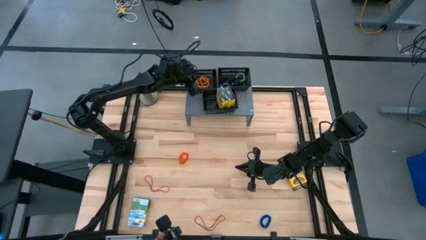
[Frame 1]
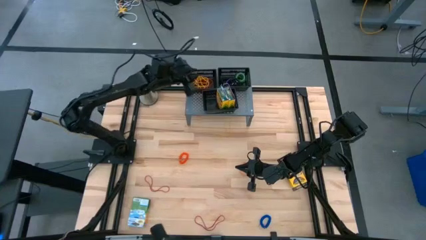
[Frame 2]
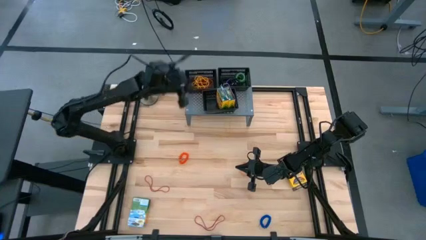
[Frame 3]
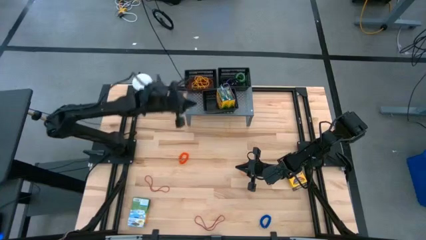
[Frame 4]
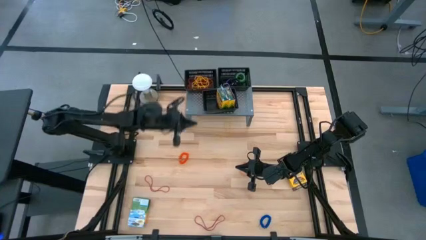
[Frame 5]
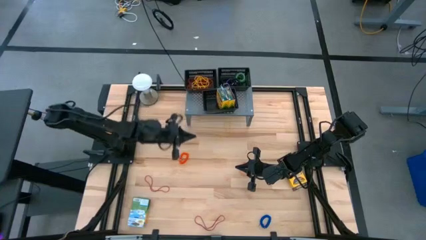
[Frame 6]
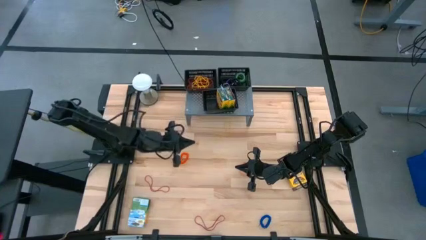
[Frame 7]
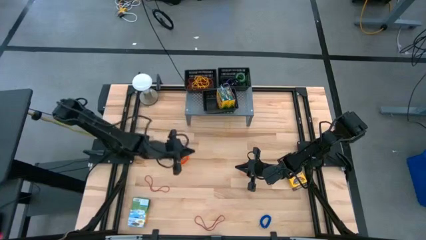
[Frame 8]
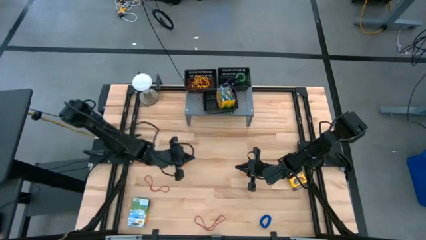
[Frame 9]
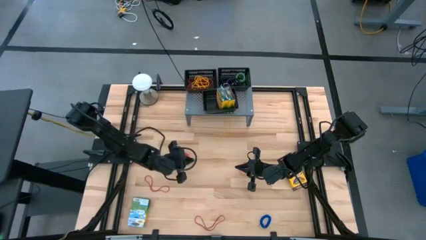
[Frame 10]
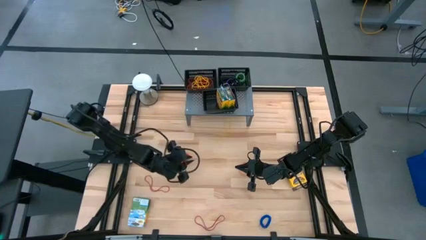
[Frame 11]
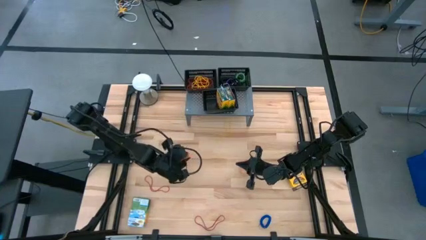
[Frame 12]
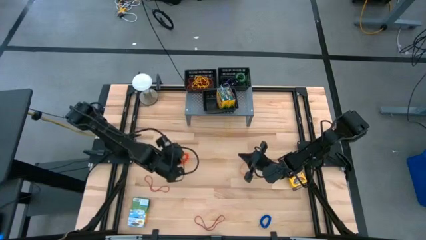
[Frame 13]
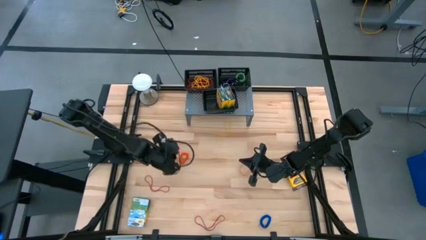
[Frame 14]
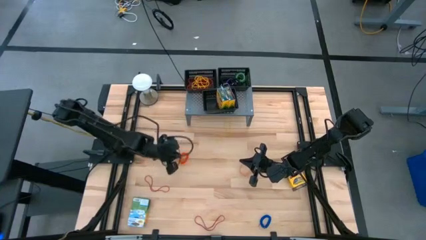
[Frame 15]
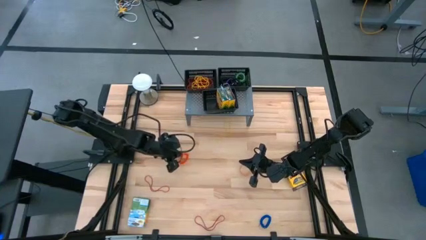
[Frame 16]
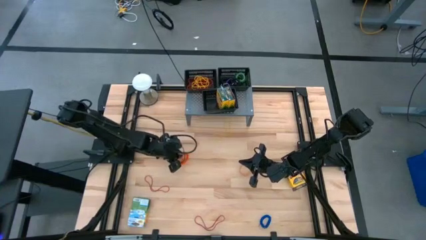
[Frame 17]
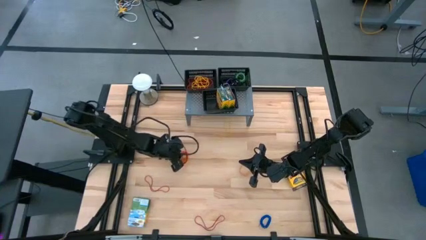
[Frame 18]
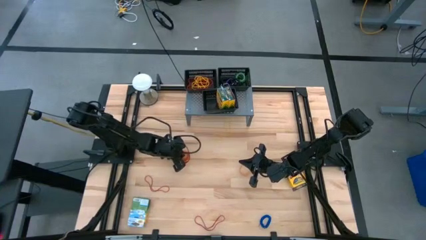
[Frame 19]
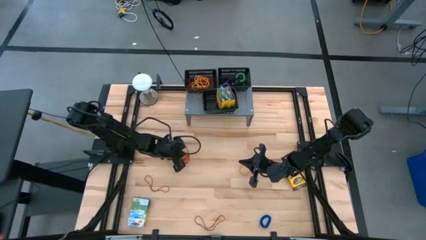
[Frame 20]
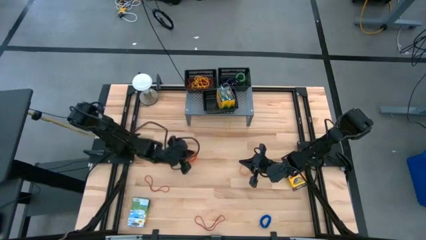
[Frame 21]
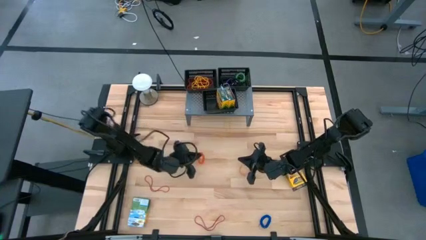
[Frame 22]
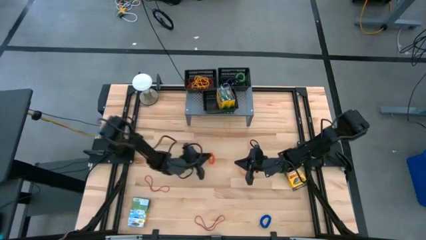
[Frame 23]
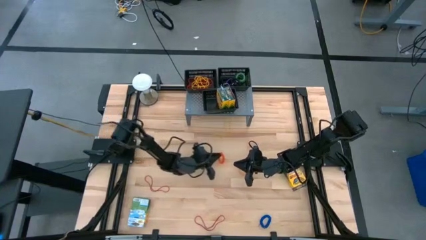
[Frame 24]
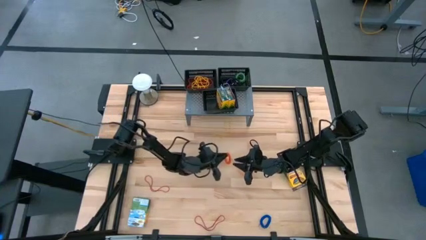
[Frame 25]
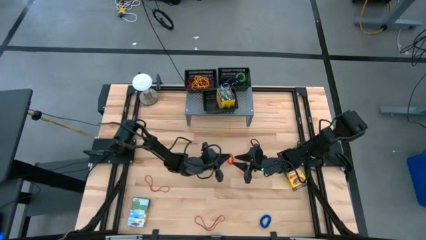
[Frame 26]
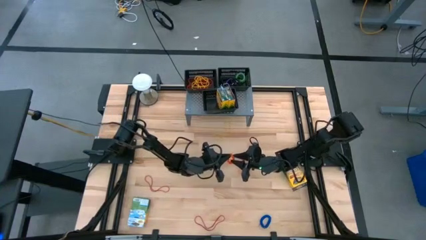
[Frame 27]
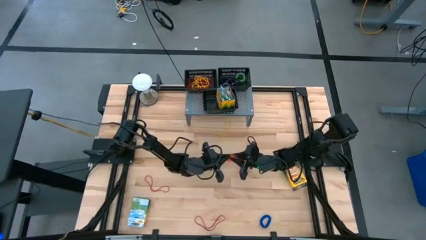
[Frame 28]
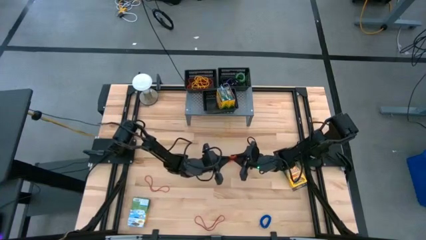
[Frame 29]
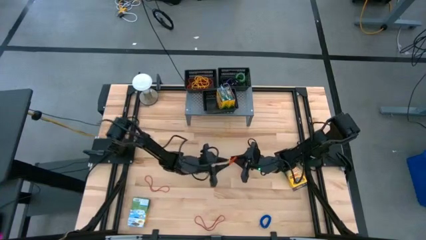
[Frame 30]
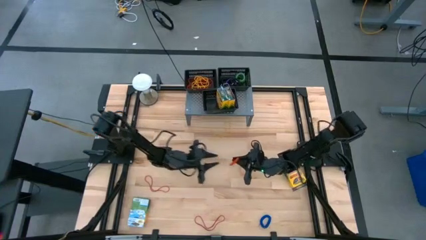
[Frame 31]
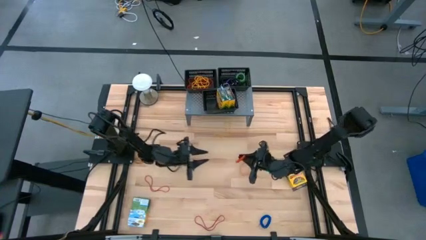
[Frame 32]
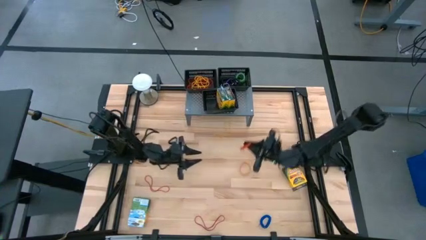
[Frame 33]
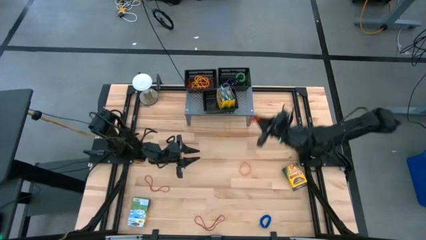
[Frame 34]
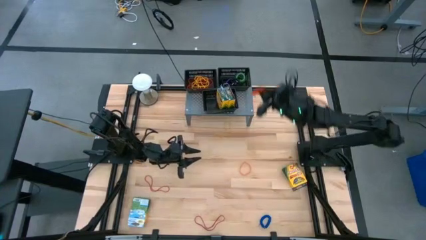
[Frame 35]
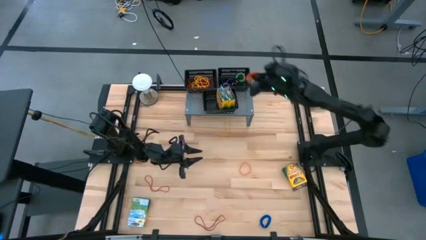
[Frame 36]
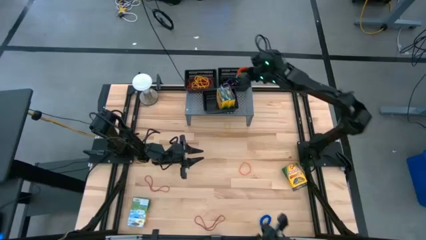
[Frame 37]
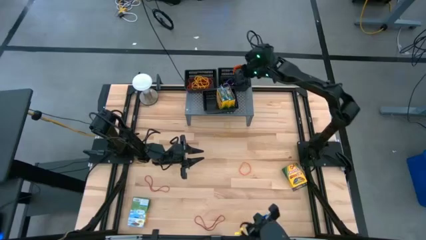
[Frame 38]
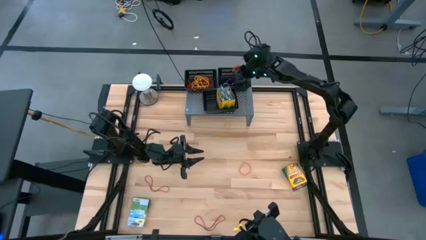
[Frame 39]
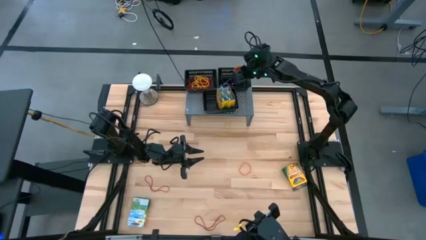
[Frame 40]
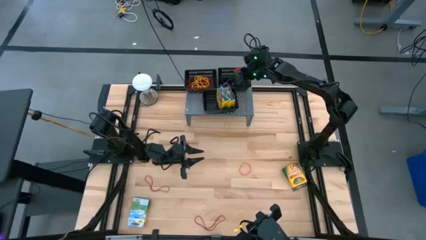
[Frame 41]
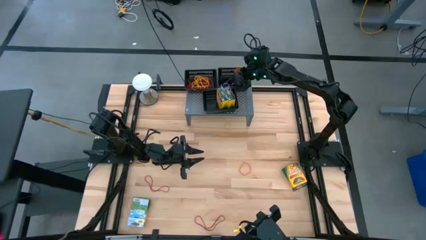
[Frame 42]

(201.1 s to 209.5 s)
Task: Pick & Place Office Desk Supplies
Put the orange spring keychain into the top right black basket on the shelf

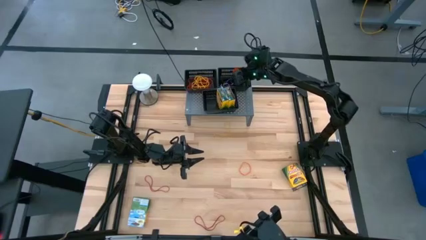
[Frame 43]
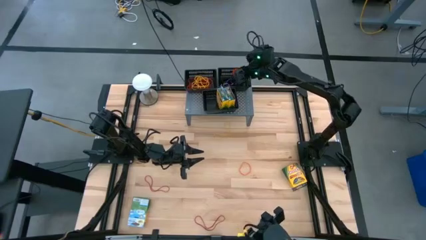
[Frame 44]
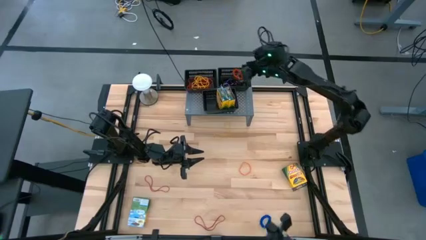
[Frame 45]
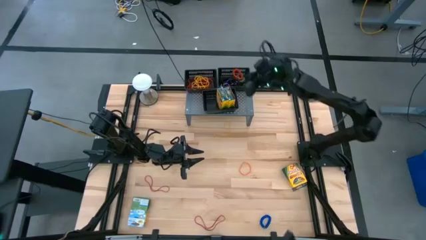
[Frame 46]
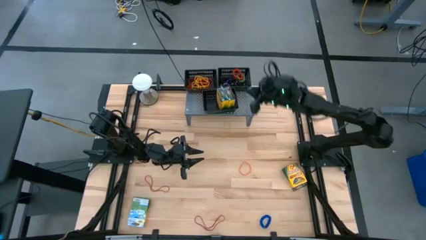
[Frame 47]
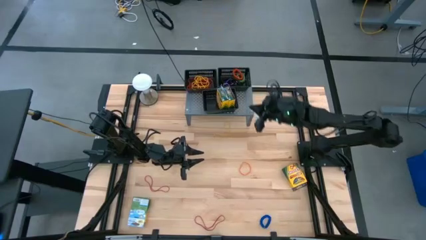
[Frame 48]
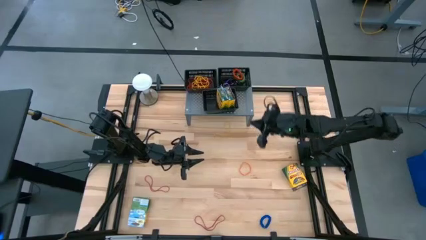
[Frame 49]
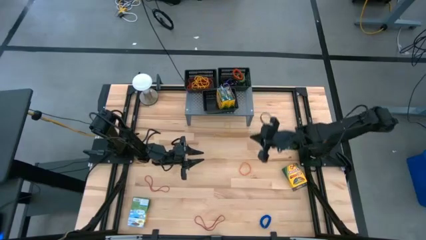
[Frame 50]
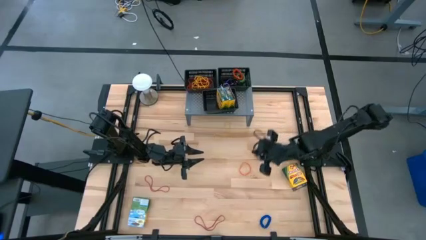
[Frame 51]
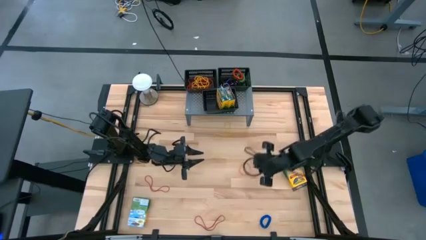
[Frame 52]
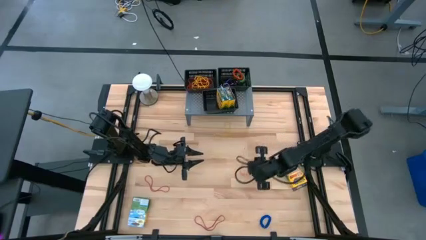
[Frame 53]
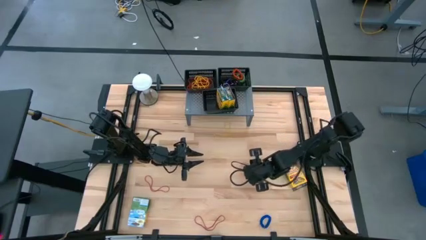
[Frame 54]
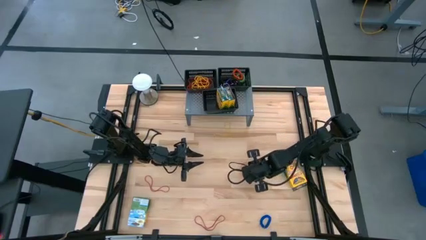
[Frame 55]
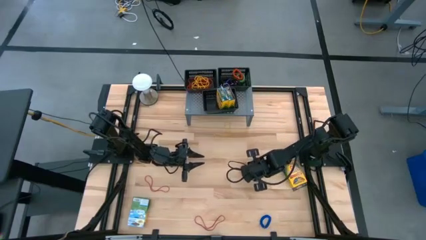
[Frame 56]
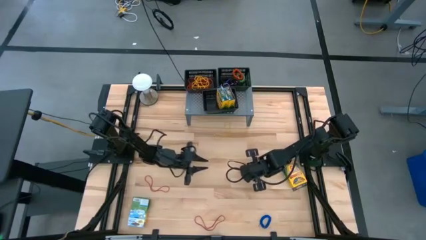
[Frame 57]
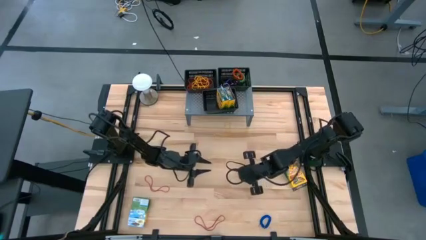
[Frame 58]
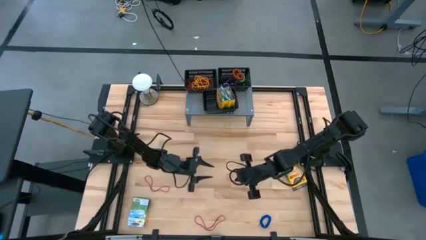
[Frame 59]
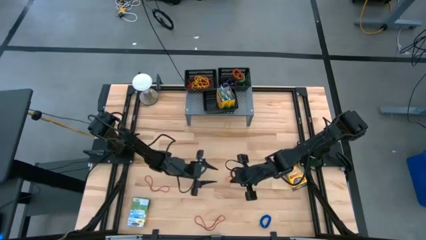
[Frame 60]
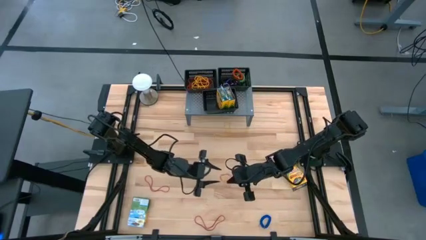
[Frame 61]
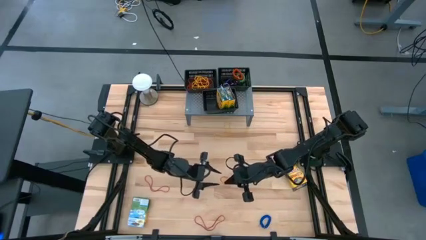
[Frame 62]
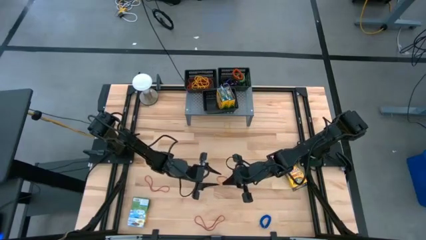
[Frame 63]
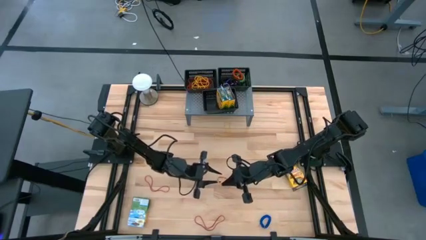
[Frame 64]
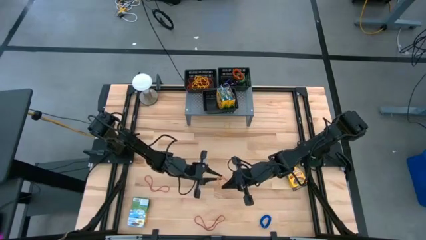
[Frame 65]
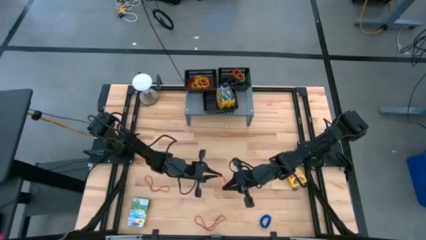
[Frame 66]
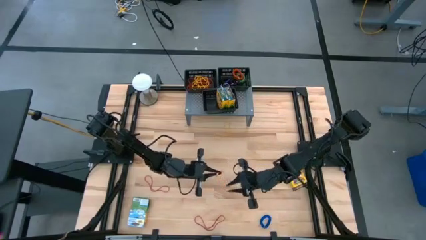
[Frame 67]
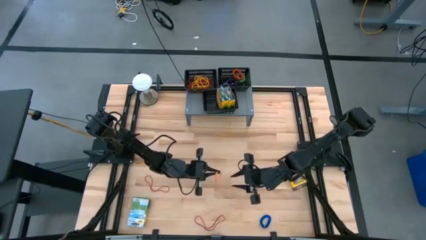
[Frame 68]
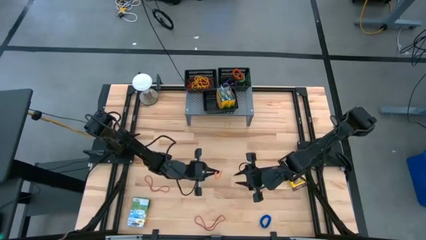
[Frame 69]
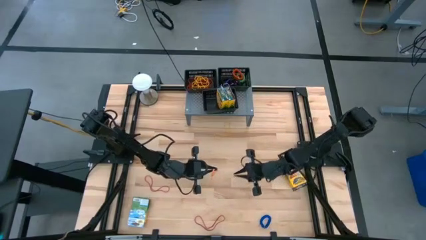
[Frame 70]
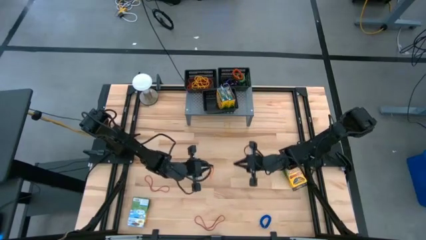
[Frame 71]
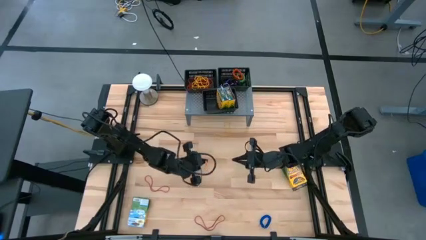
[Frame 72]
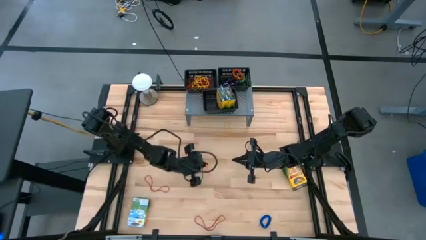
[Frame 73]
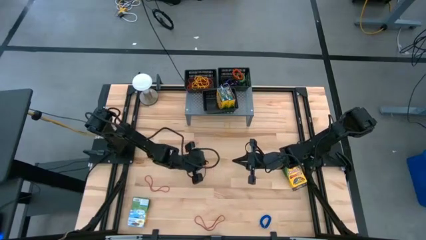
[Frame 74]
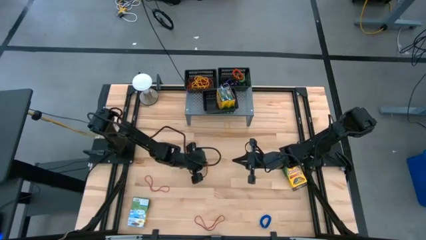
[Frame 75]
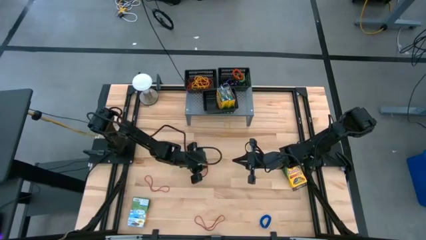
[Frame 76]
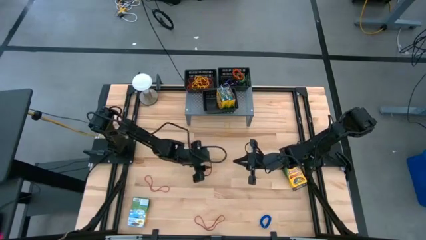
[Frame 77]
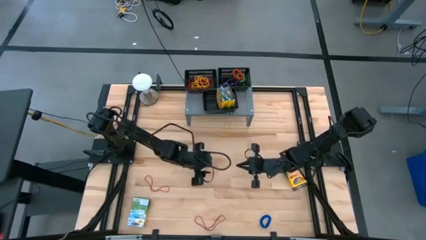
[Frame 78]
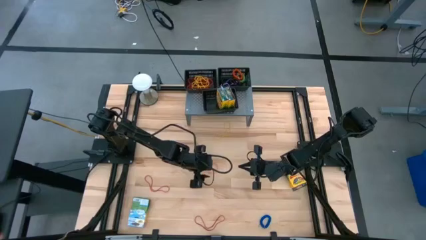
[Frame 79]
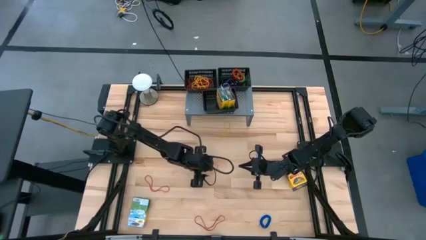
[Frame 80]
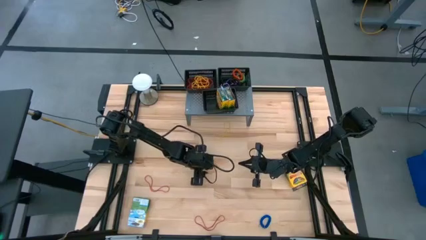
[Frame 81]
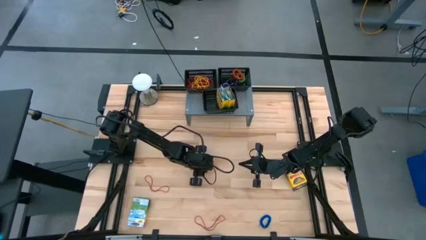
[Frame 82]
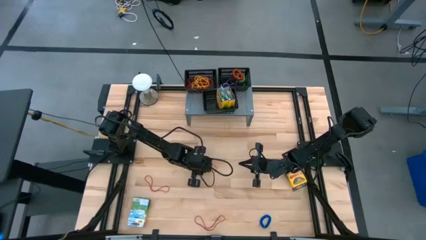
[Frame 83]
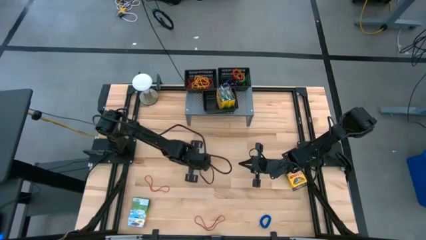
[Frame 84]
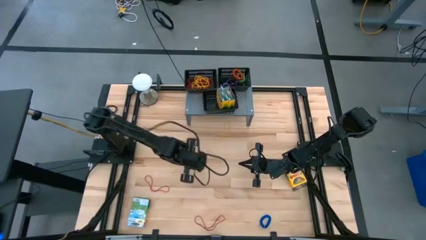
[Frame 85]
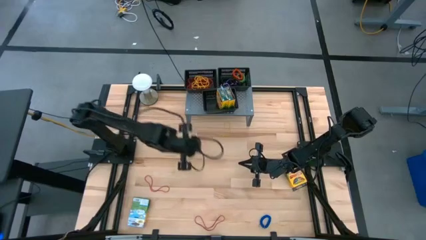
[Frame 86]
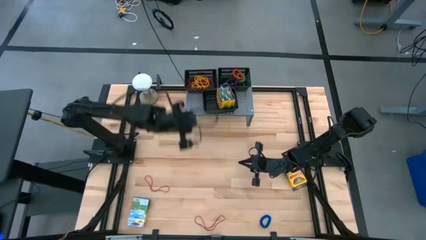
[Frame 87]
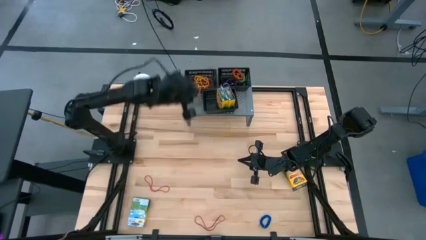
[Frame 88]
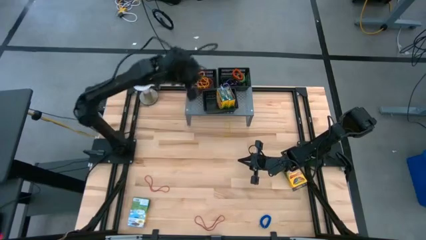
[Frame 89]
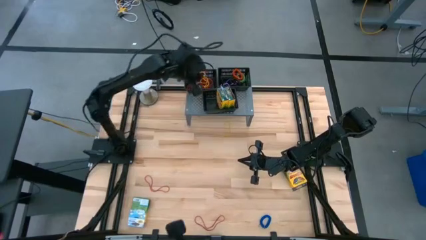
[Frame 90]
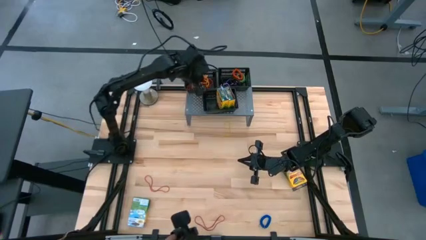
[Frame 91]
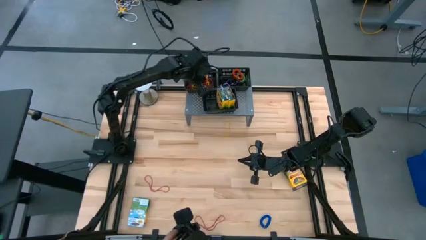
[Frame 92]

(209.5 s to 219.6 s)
Put the orange rubber band into the top left black basket on the shelf
